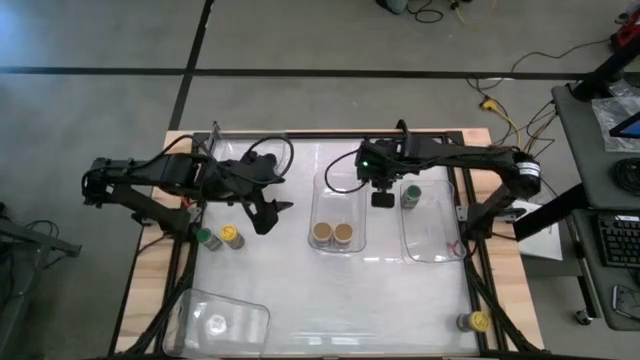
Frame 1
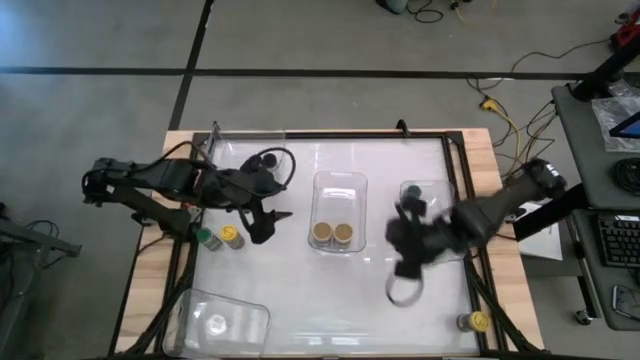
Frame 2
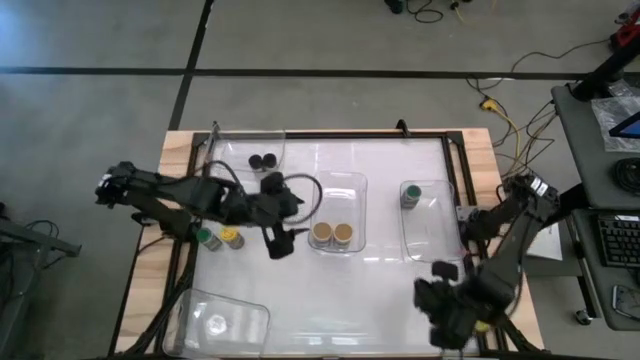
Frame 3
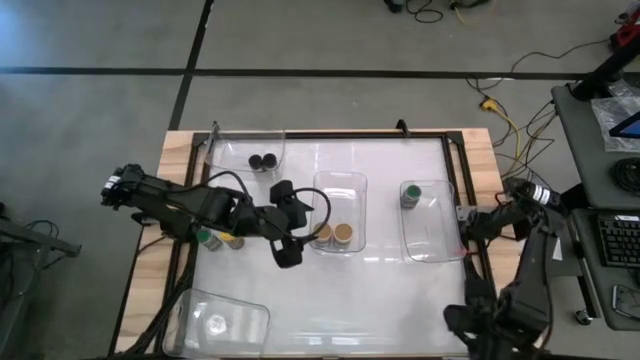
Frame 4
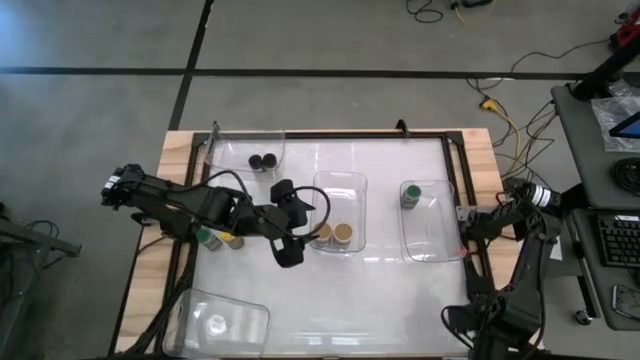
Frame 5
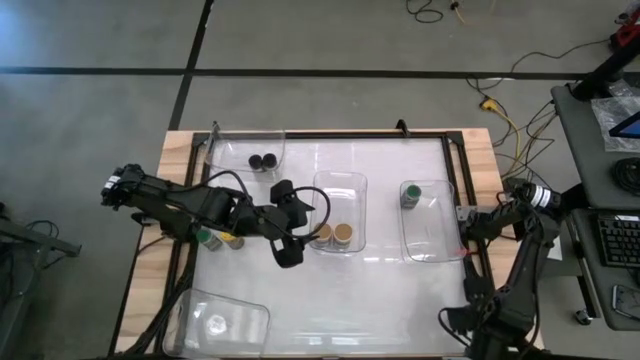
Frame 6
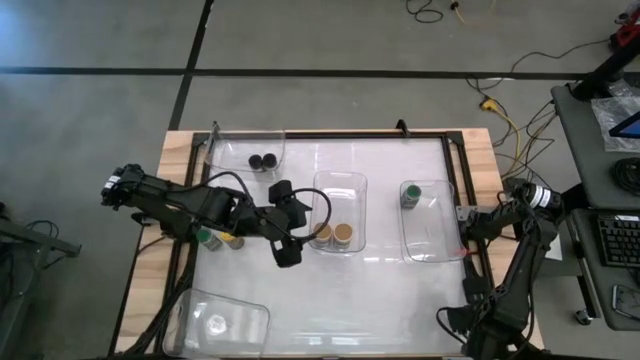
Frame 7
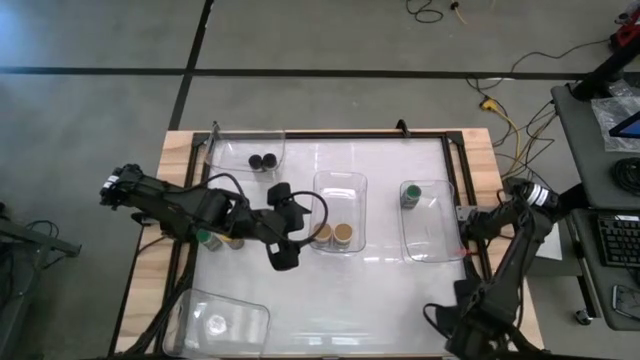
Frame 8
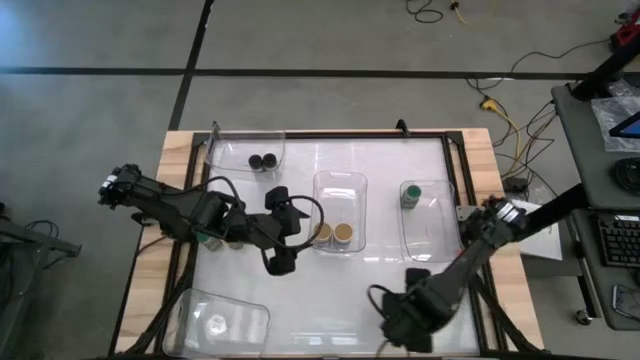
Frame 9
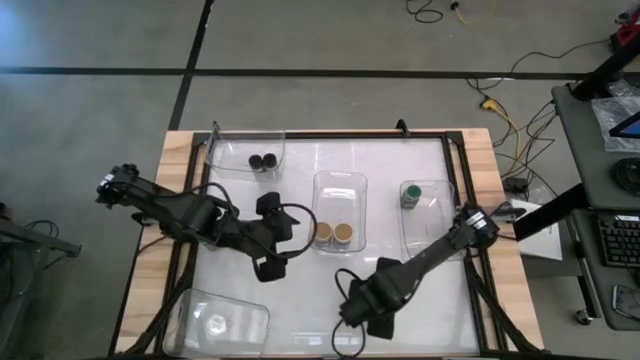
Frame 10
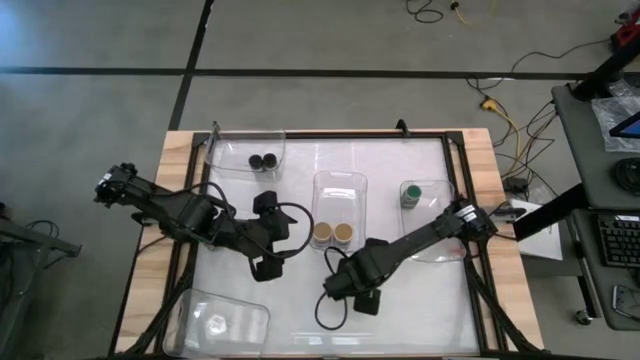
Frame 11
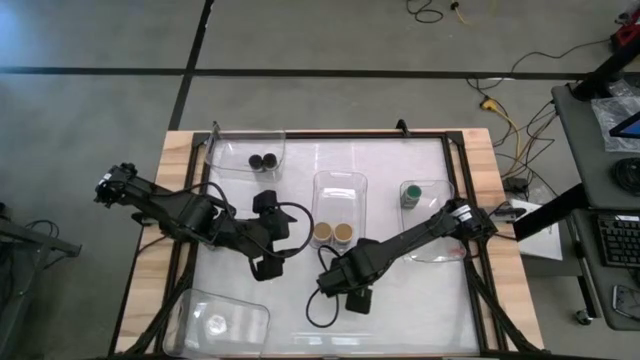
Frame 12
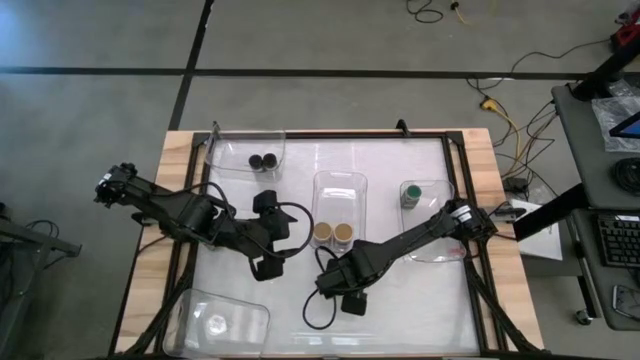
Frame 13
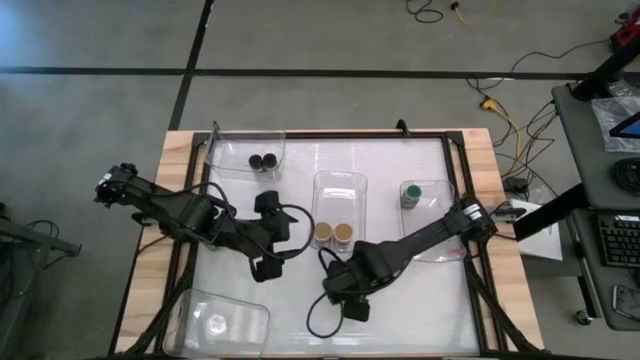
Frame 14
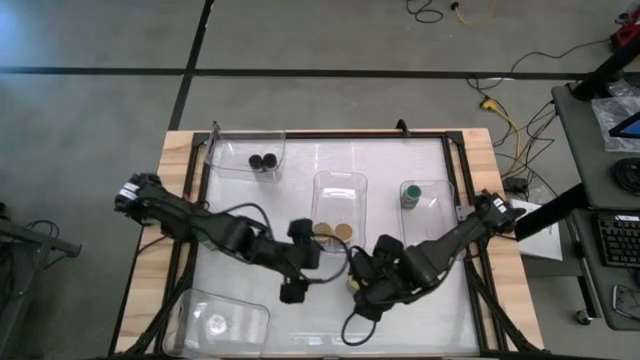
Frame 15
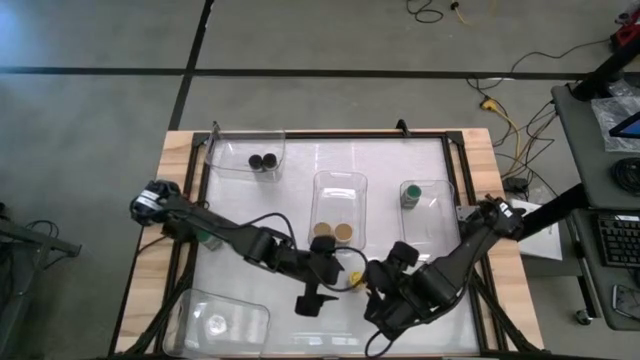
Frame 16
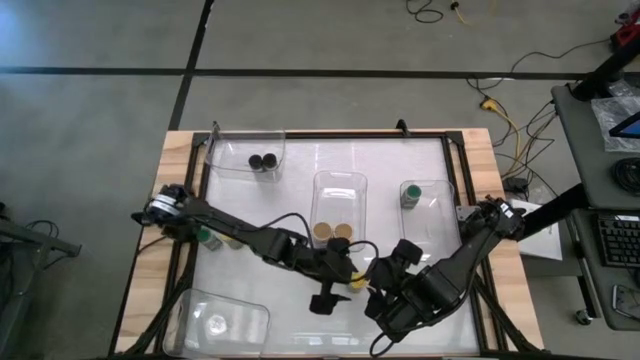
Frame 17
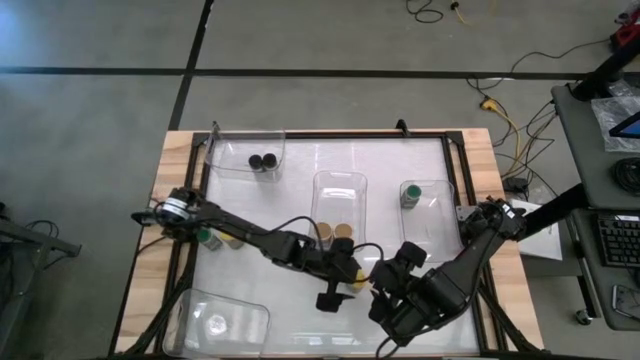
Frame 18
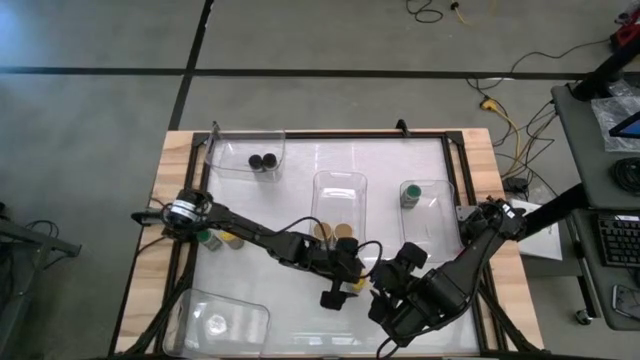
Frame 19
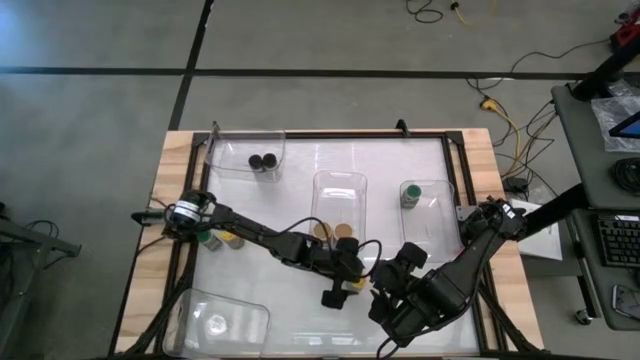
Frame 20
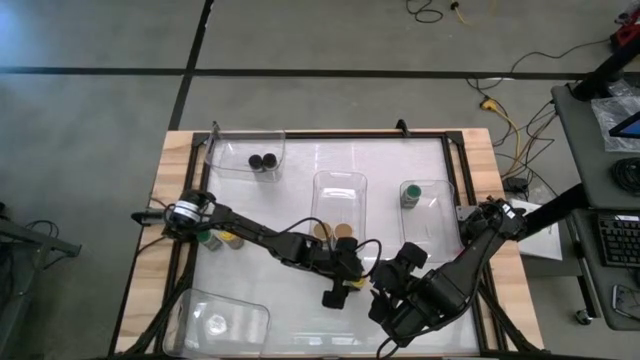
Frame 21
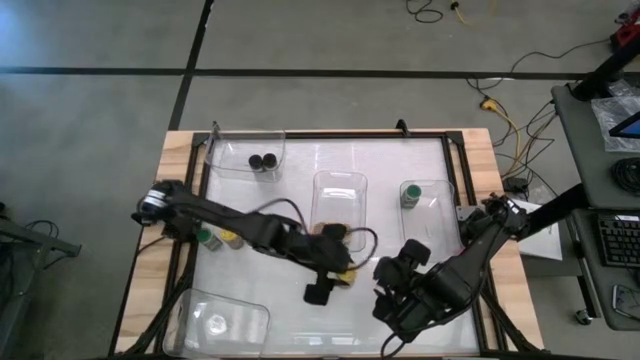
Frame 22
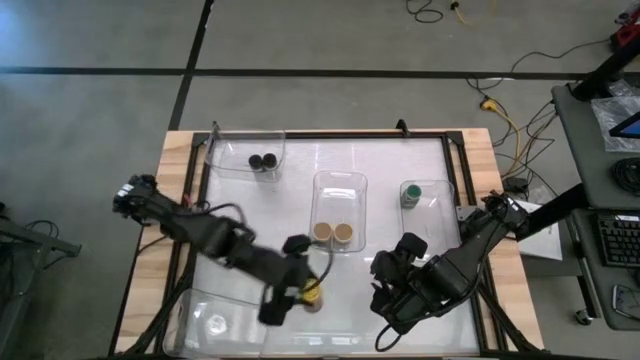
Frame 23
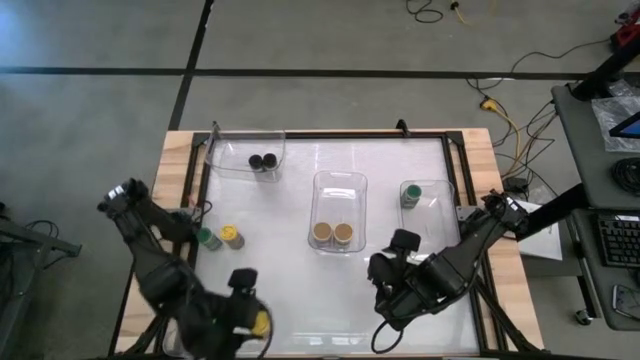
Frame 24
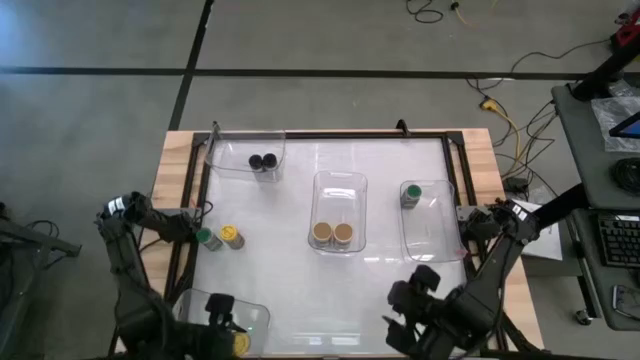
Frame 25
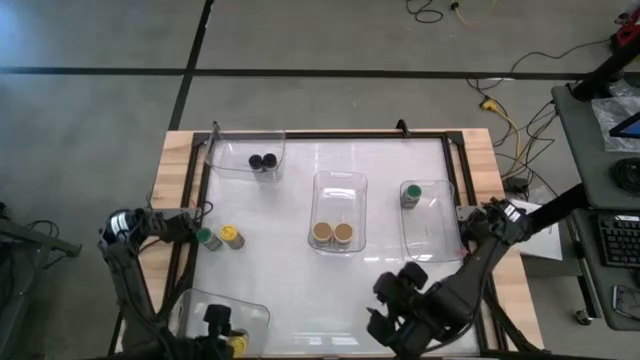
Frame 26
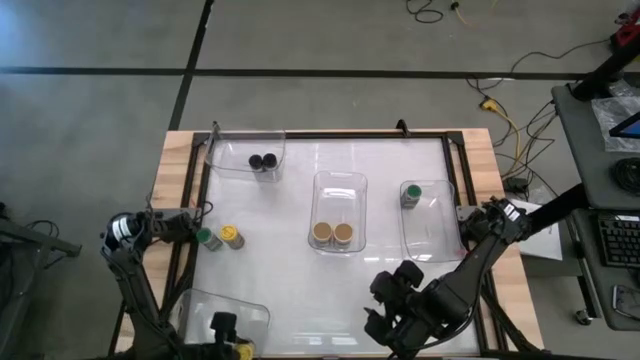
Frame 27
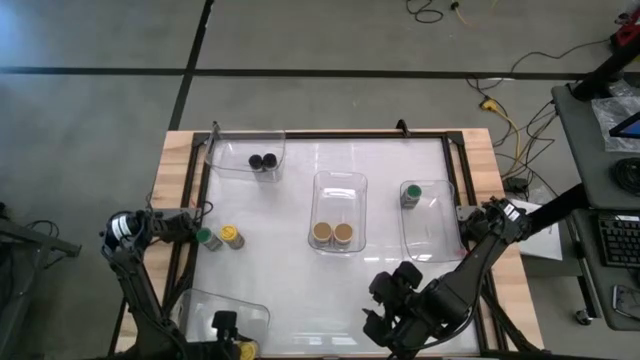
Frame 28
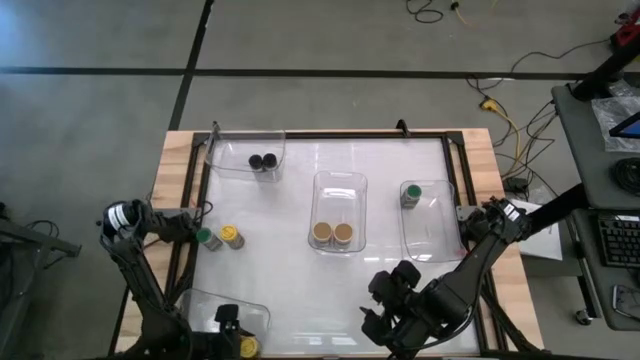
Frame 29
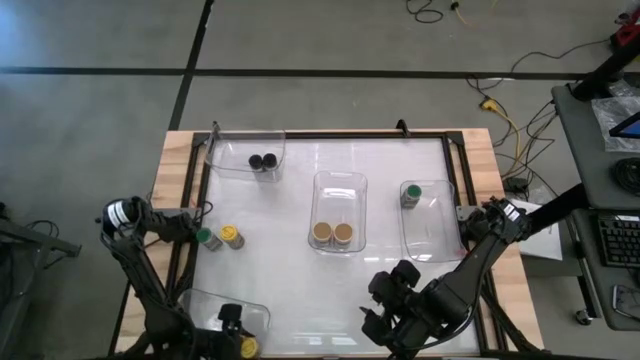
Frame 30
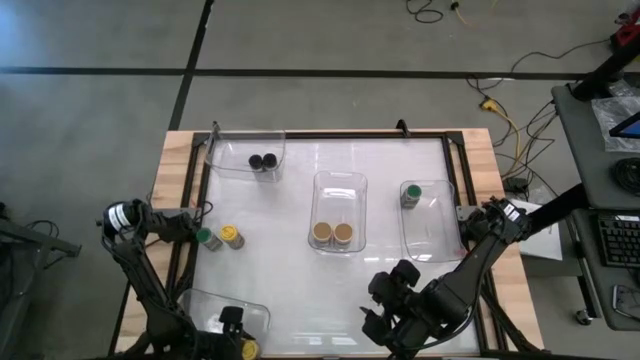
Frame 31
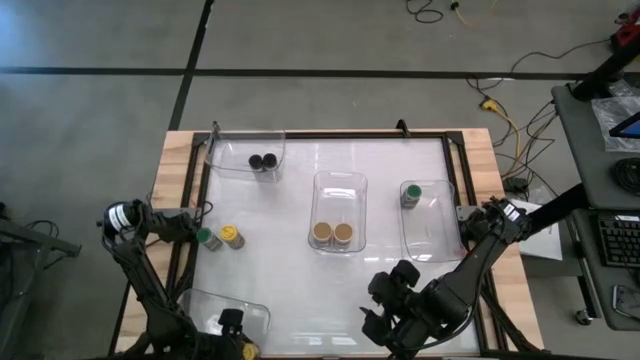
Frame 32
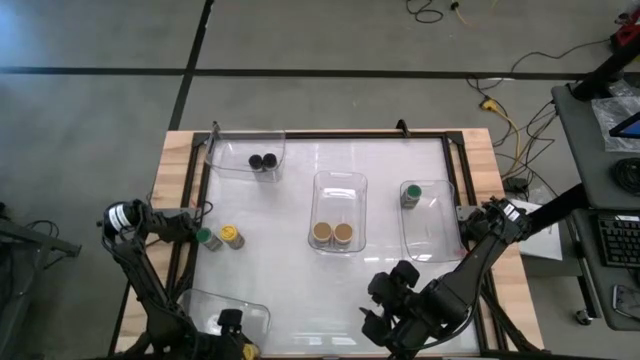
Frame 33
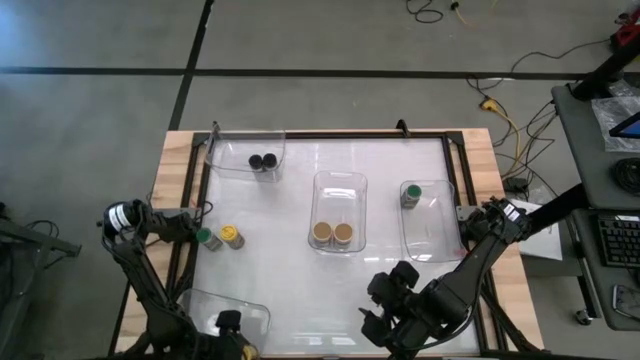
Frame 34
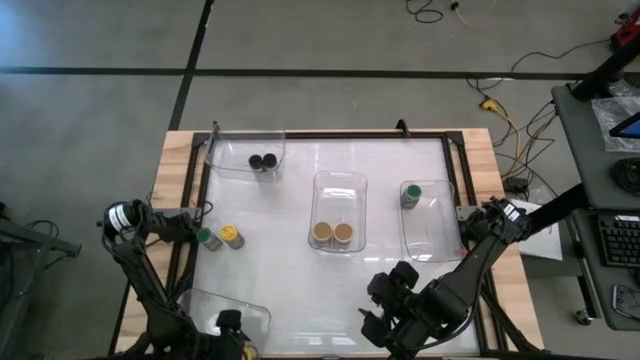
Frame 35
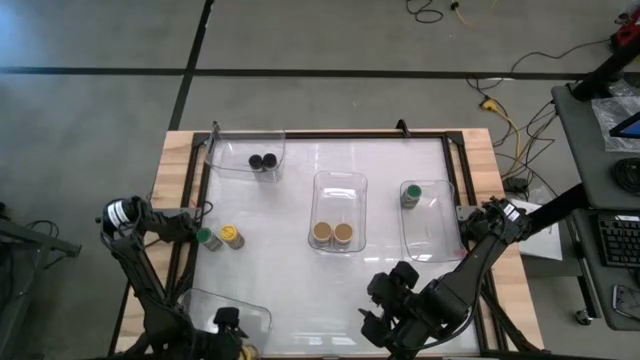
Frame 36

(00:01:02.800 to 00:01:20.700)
Task: Sort spices by type
Put the bottom yellow seasoning bottle into the bottom left transparent bin

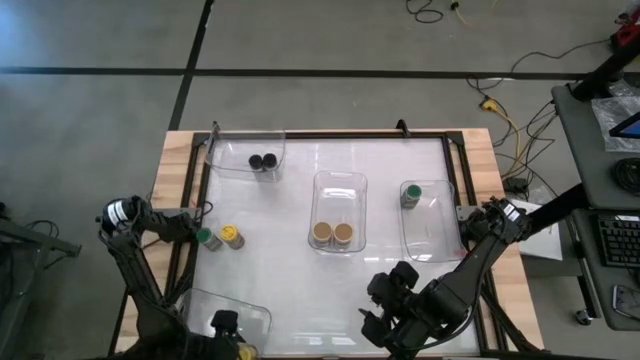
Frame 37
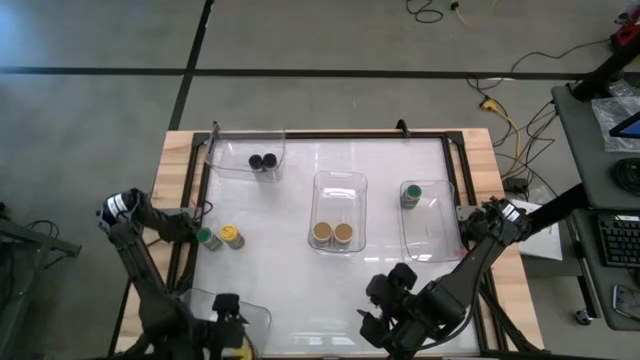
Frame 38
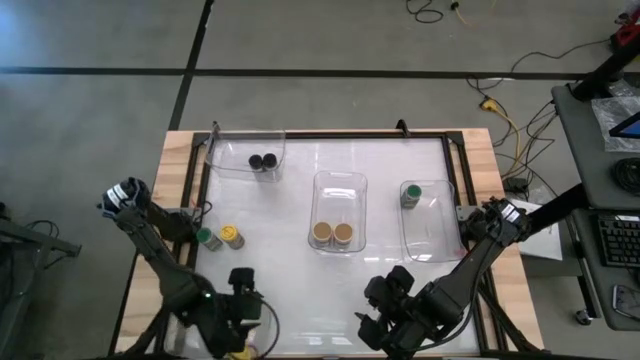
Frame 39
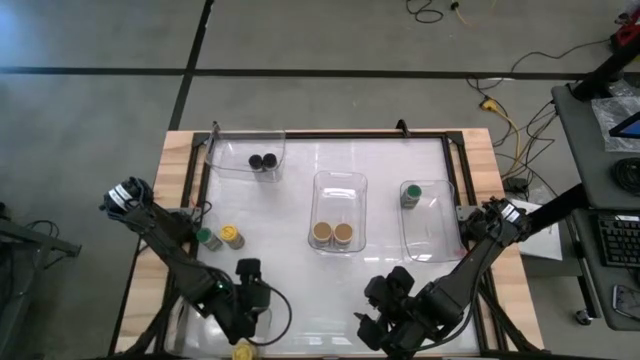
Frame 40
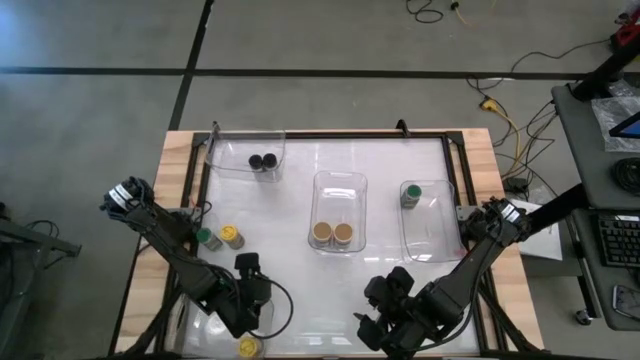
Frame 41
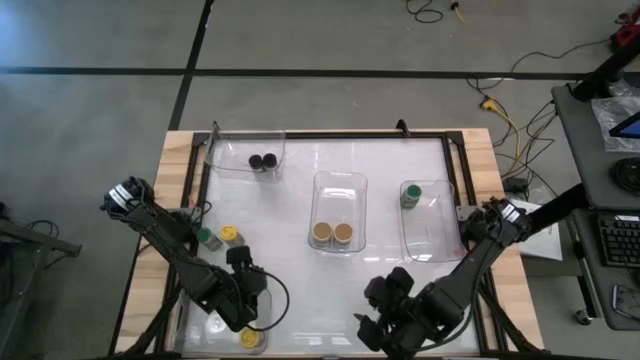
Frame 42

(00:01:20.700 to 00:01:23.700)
Adjust the bottom left transparent bin

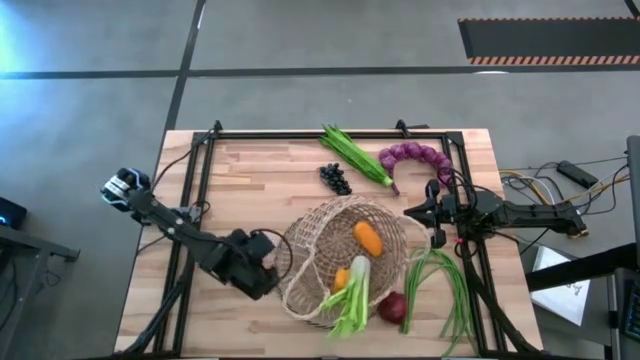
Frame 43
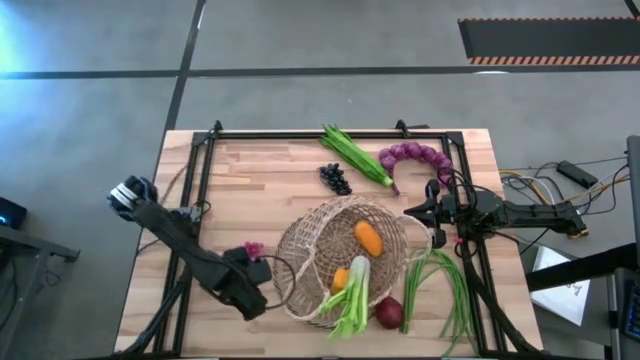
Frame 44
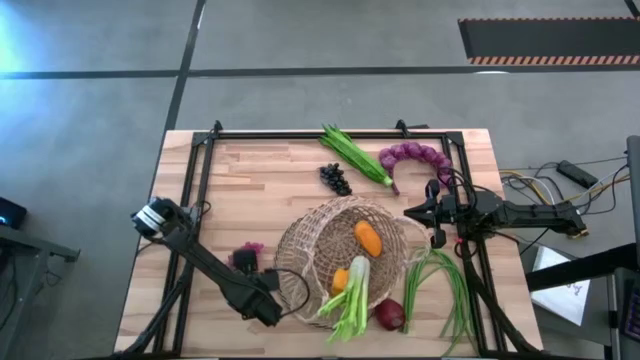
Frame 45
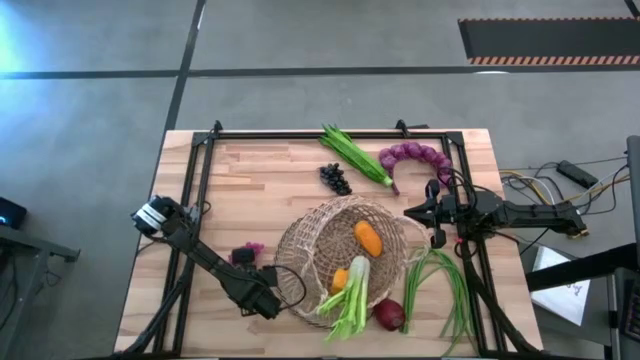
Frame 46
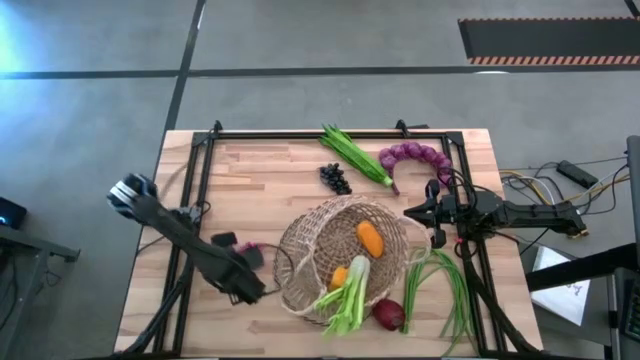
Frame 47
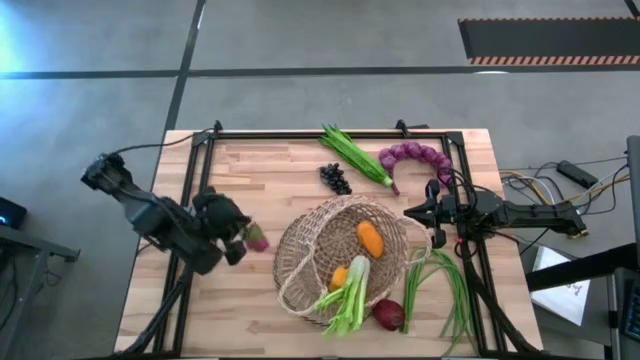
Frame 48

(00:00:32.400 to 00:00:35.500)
Task: Build produce basket
Put the red grapes into the basket
